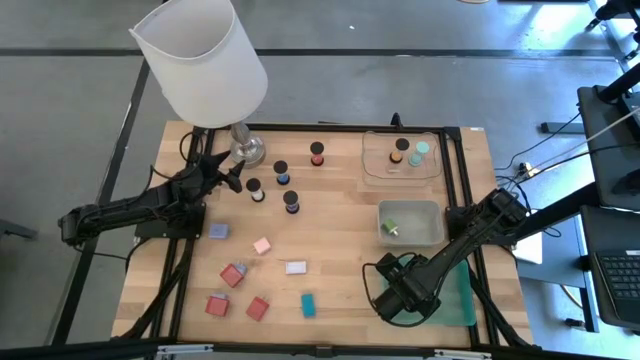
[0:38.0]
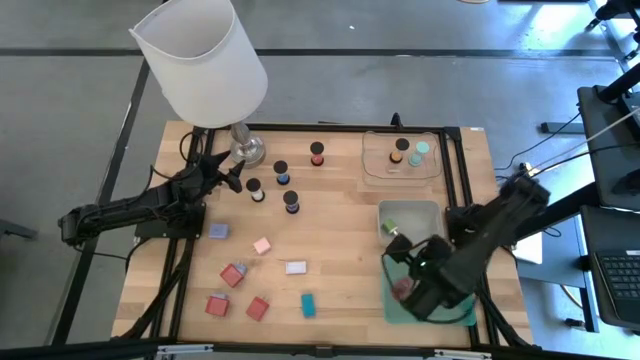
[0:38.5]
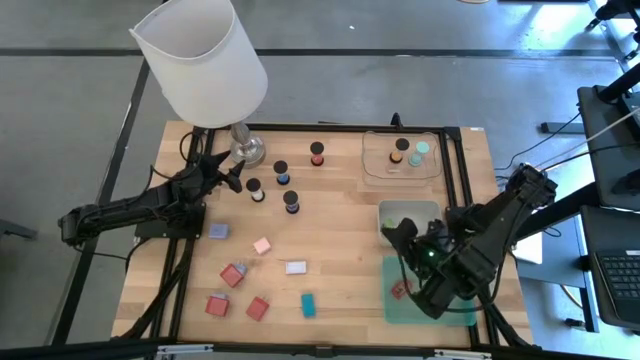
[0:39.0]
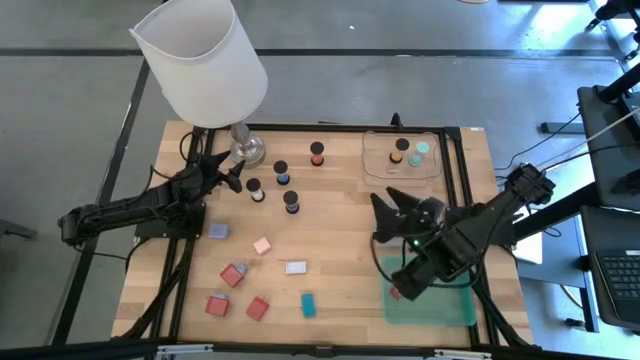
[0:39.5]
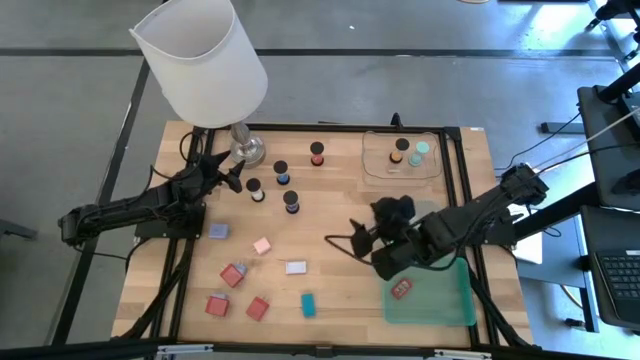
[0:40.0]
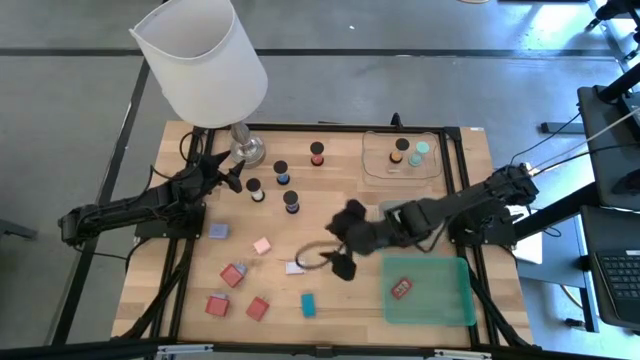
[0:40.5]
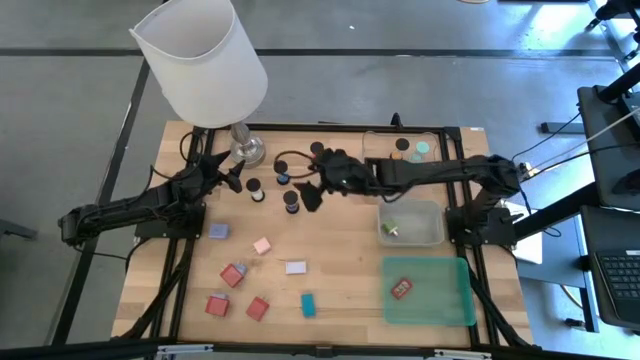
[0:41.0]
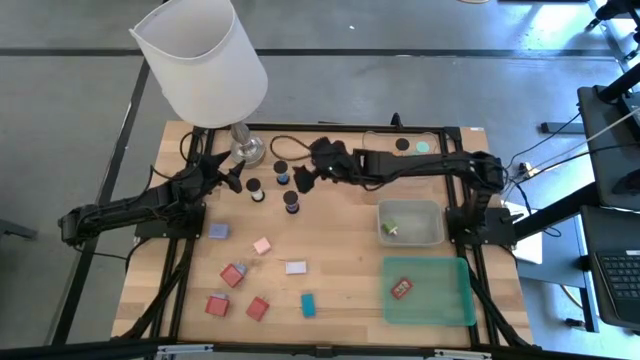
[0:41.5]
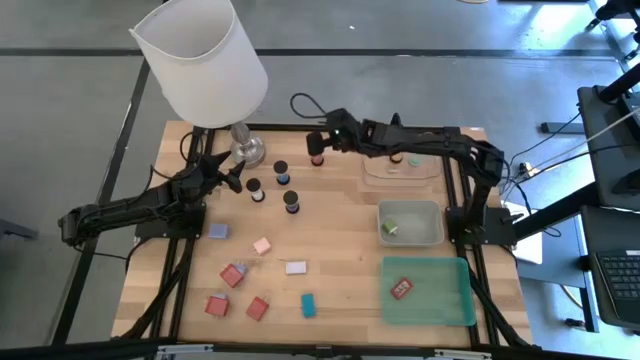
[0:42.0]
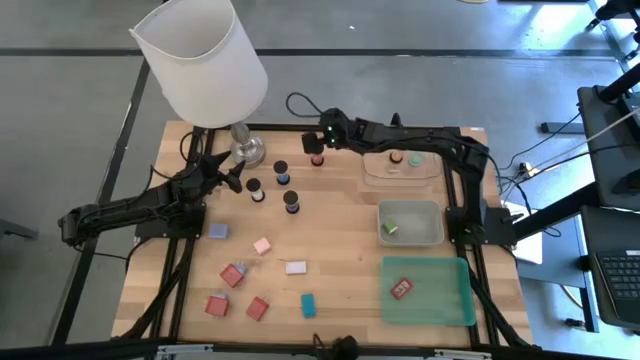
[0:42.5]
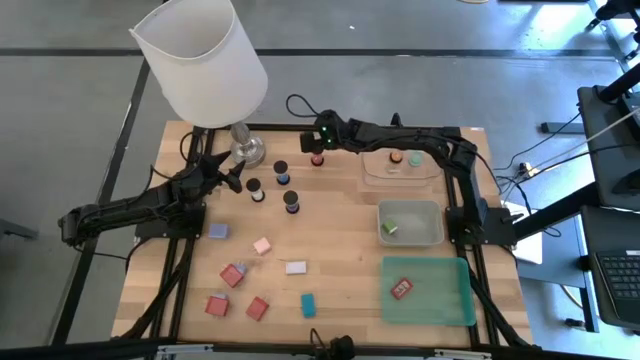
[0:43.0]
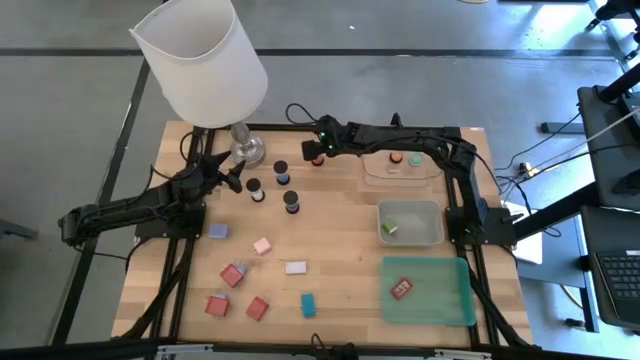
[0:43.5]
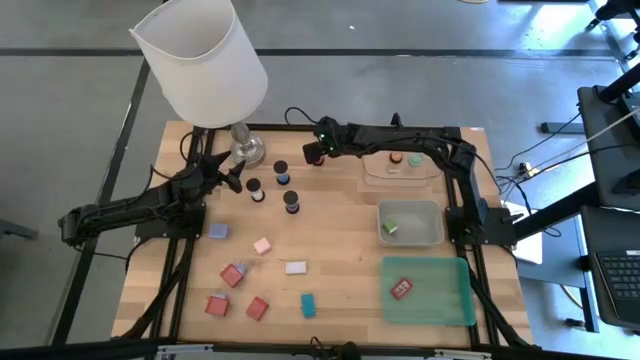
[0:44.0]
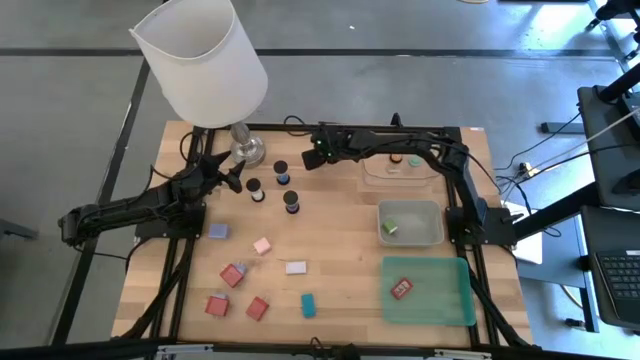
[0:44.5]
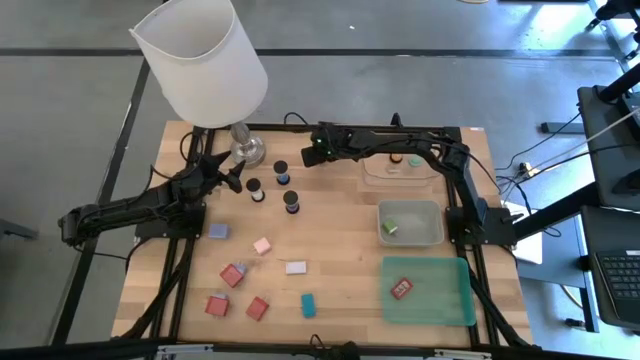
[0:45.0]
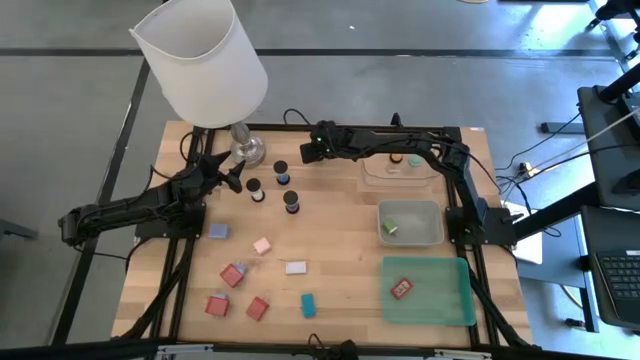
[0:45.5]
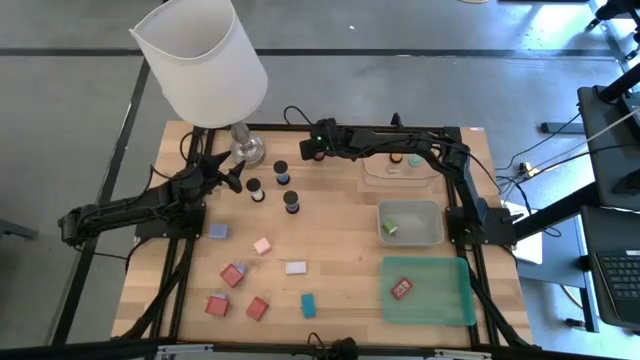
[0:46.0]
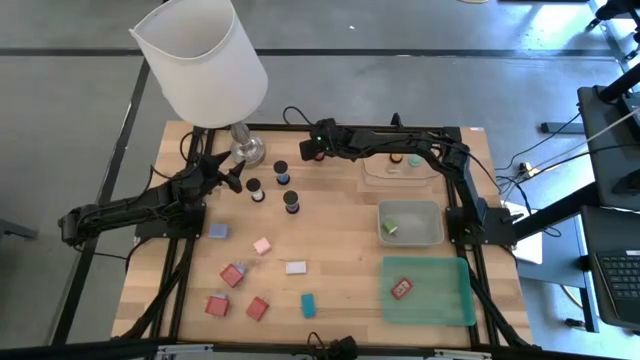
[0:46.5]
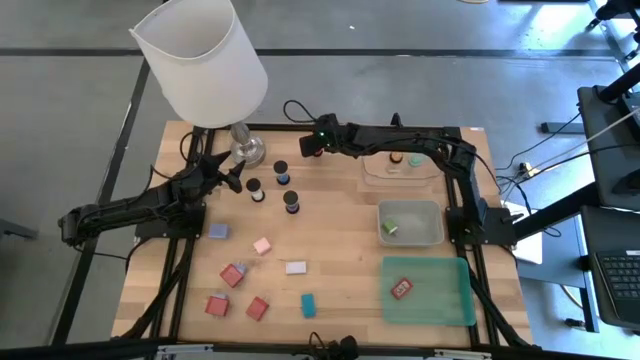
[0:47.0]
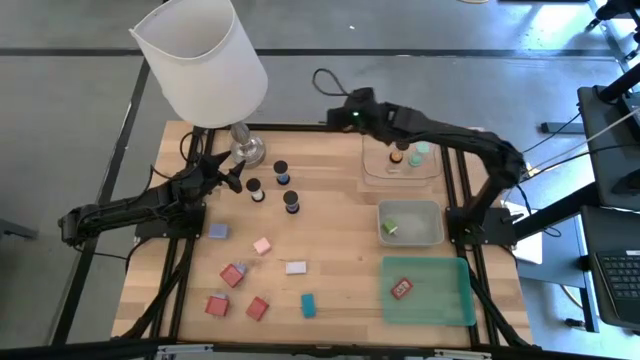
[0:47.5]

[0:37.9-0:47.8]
Task: Pick & Place Office items
Put the red hourglass into the transparent bin

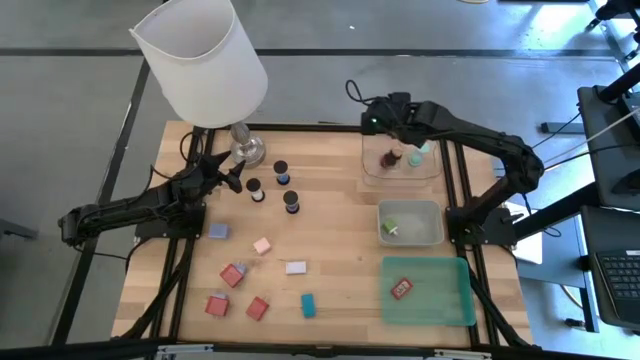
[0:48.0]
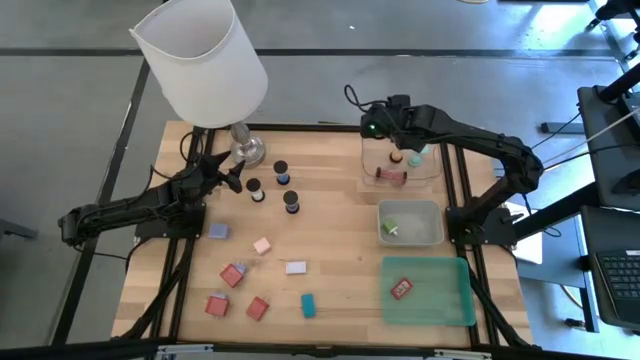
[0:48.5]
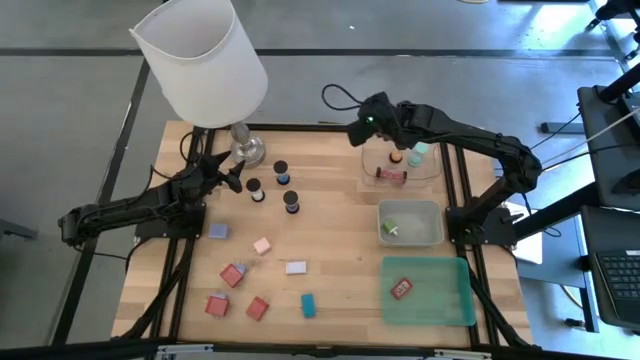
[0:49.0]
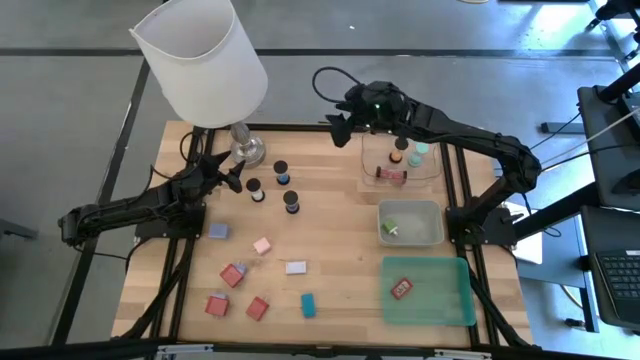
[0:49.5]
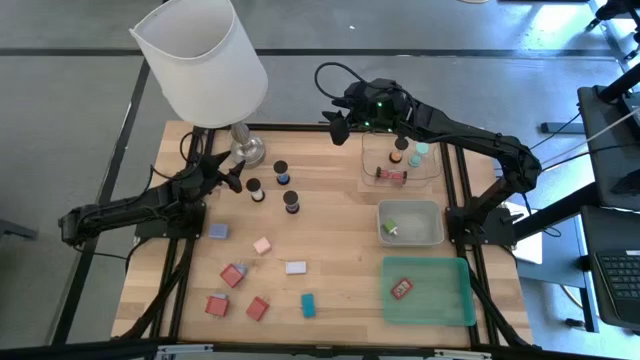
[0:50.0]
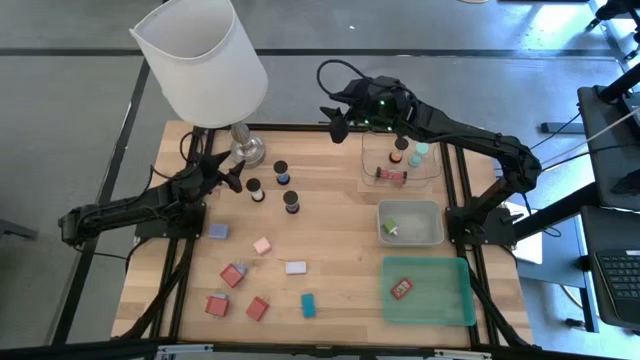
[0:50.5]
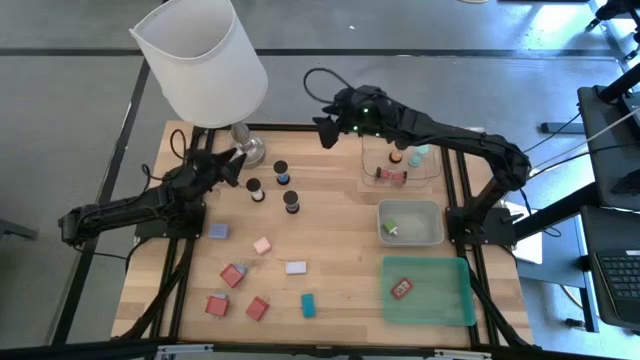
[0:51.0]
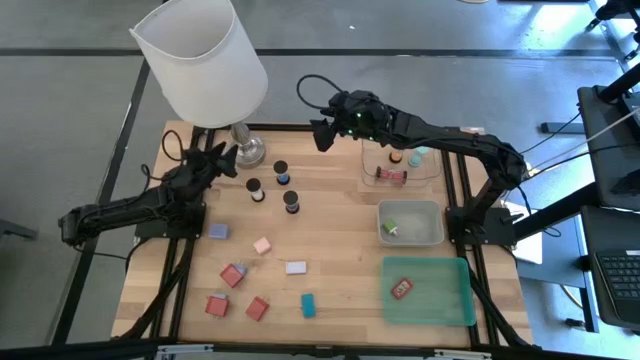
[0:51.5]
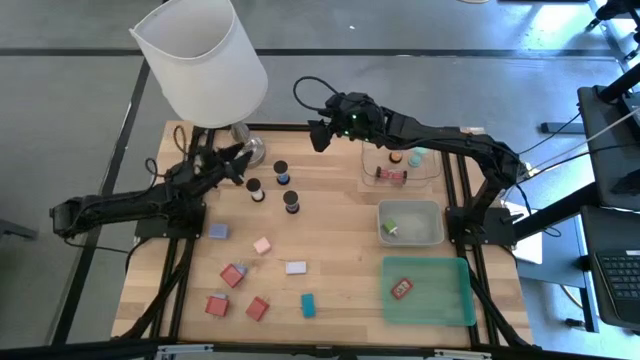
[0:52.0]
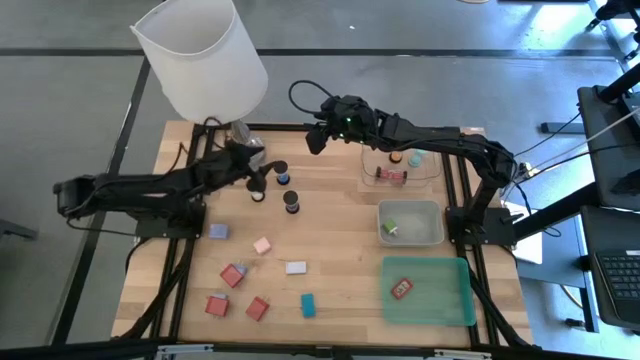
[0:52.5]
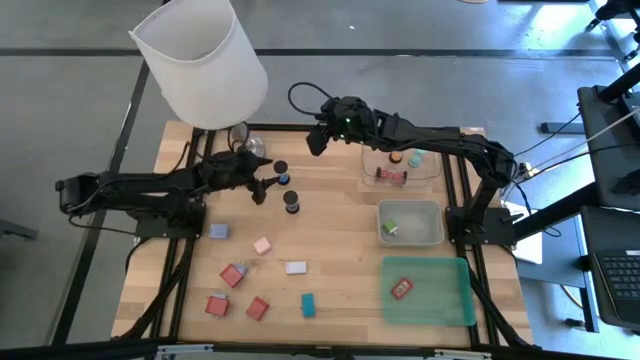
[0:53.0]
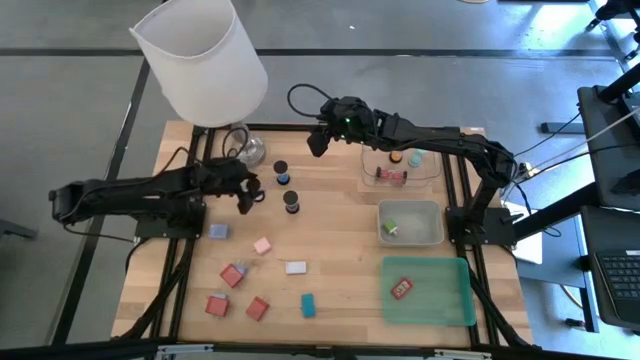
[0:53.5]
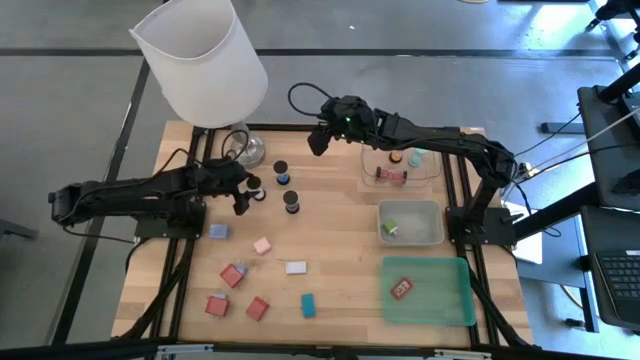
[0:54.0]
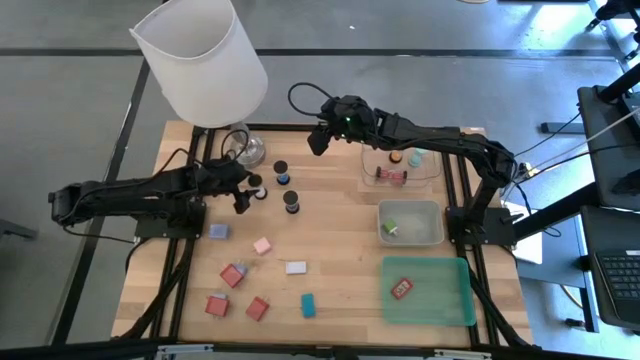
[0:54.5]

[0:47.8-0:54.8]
Put the white hourglass into the transparent bin

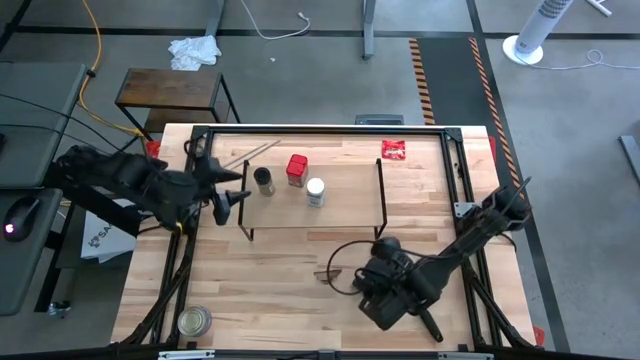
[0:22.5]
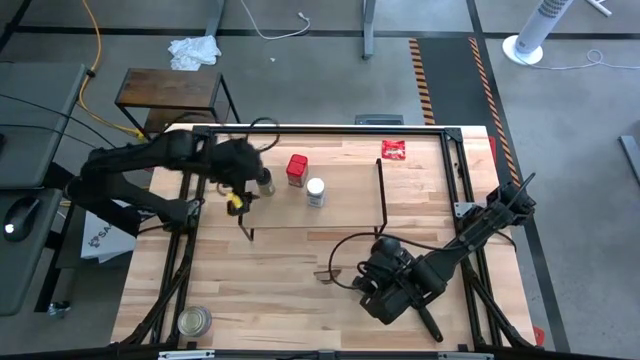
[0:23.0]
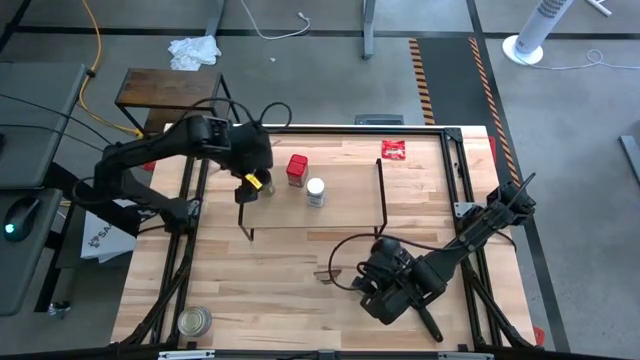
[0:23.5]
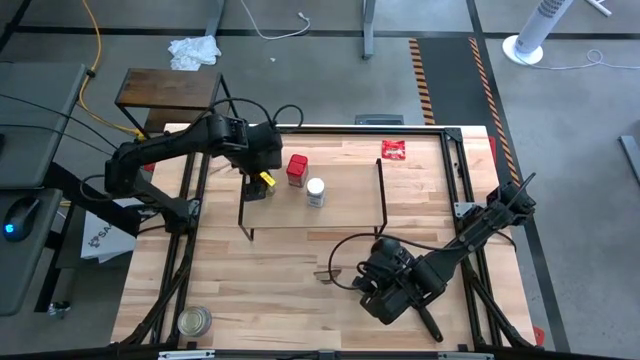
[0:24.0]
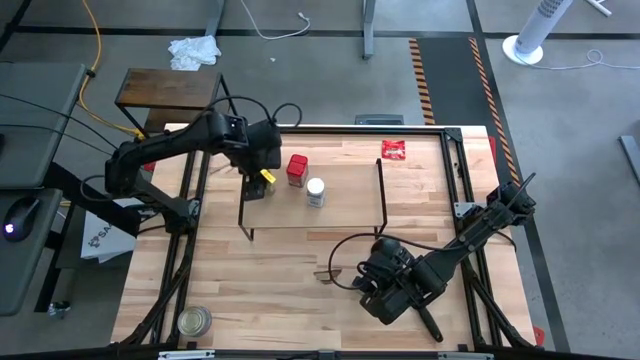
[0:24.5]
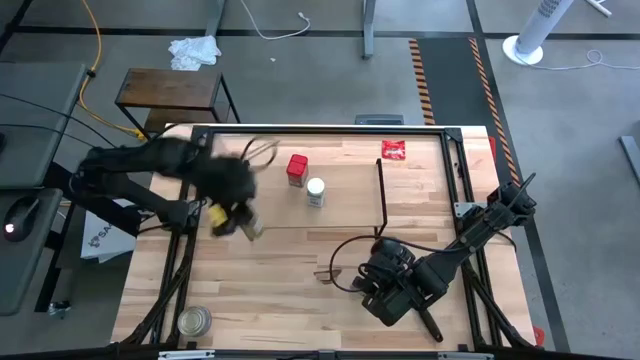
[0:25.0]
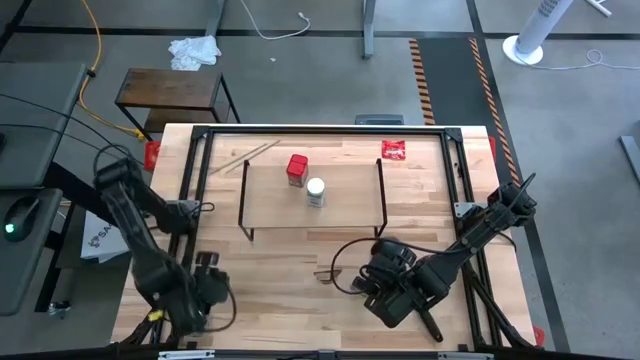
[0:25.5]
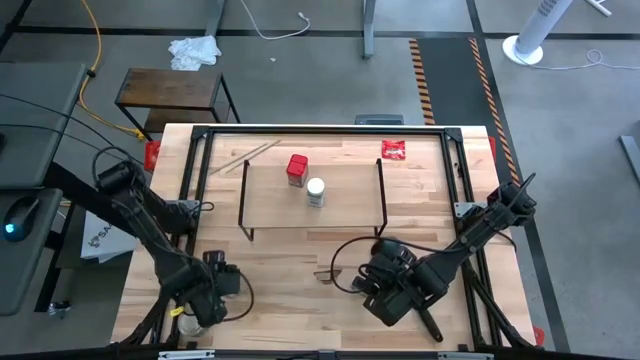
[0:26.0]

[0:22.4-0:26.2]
Task: Shelf spices
Remove the black seasoning bottle from the shelf
